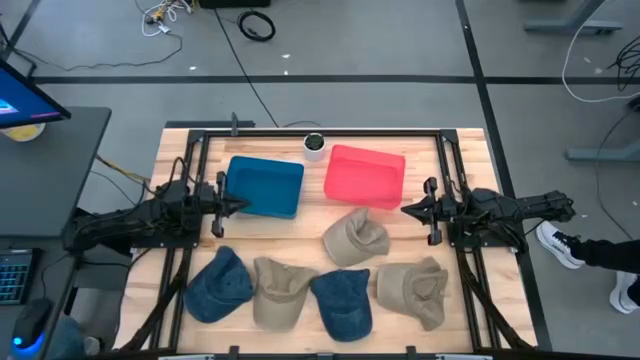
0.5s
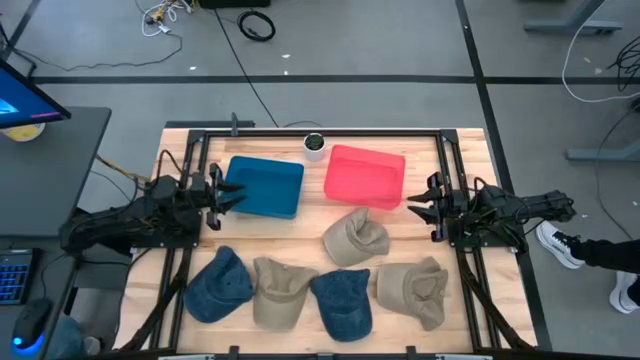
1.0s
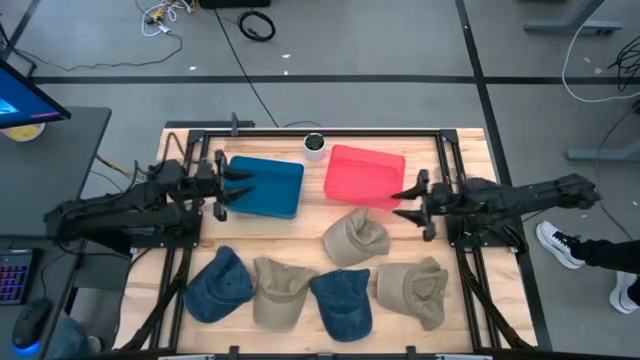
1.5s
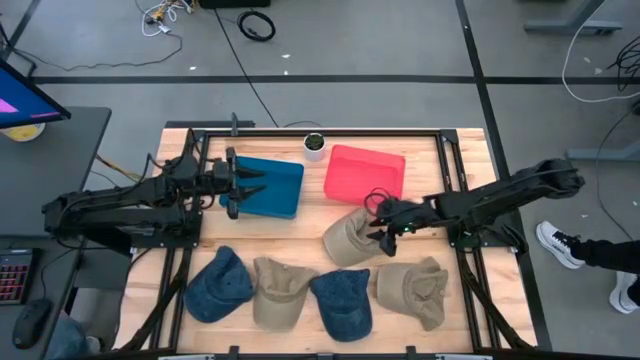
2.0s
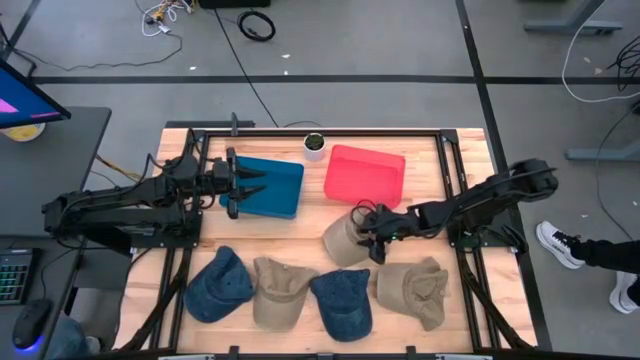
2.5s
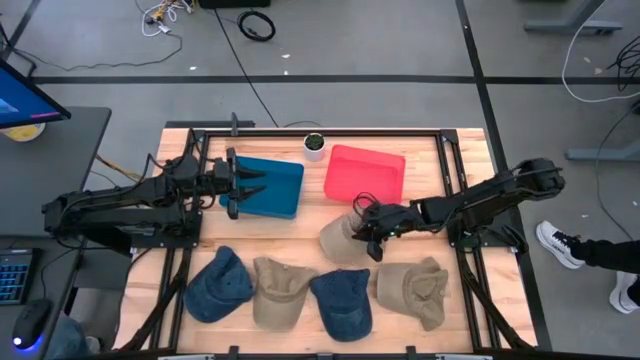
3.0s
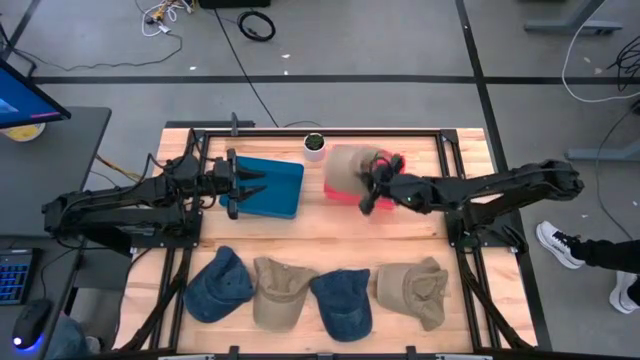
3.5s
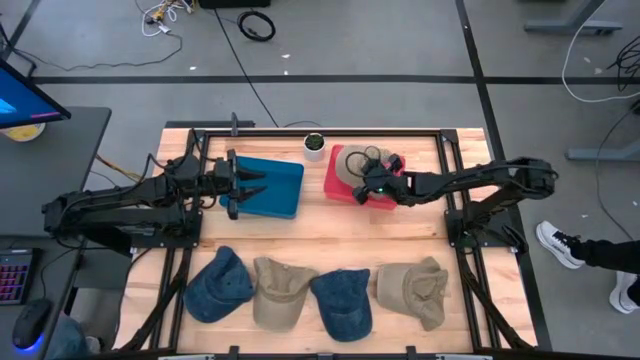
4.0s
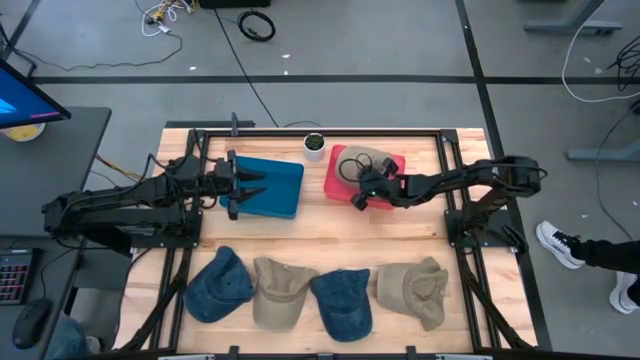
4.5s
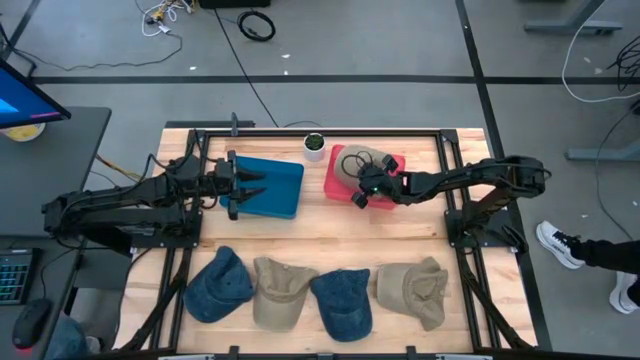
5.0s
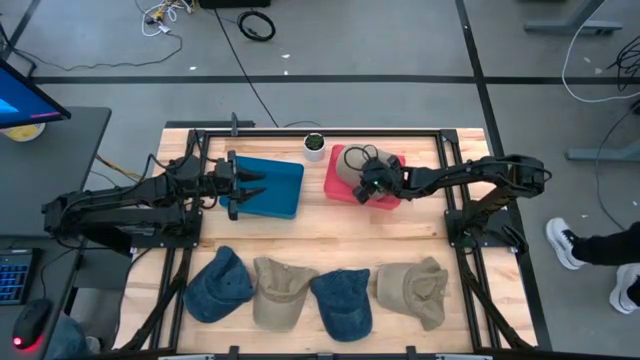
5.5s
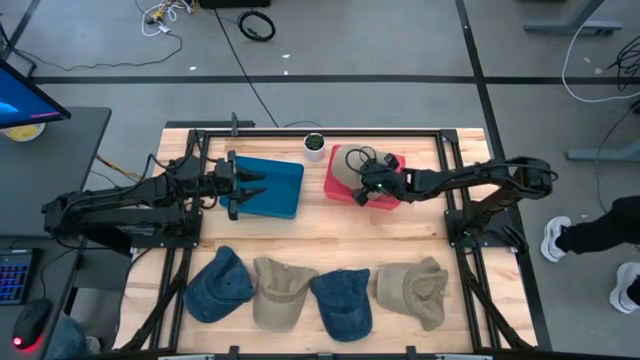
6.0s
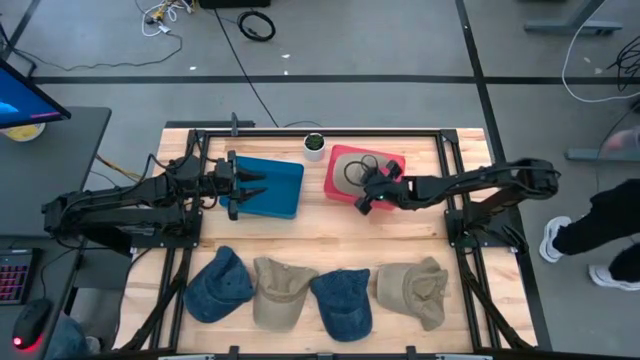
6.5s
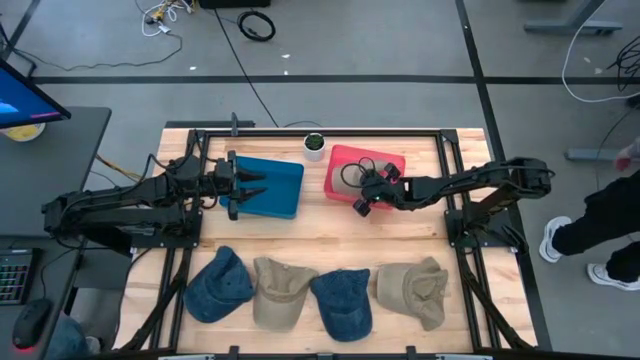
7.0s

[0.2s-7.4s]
Task: Pick & Place hat
Put the top brown cap into the red bin

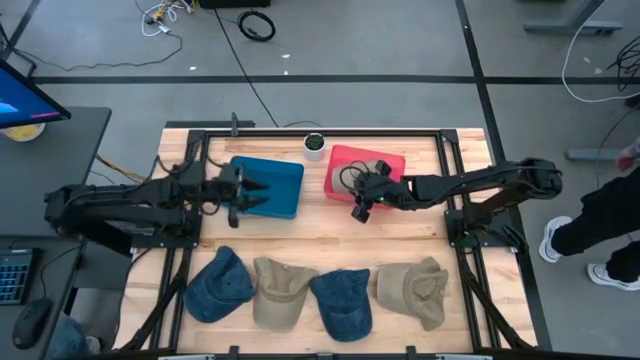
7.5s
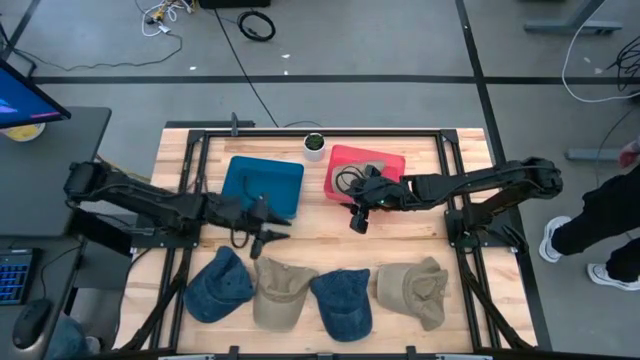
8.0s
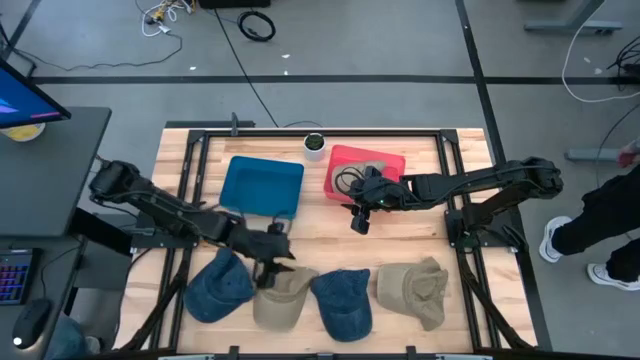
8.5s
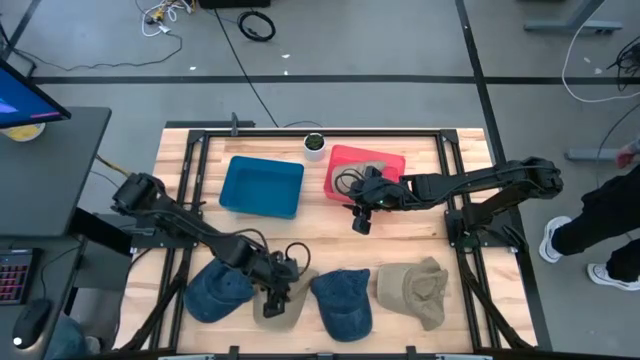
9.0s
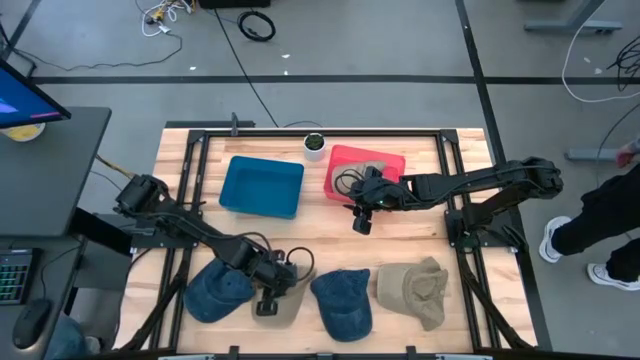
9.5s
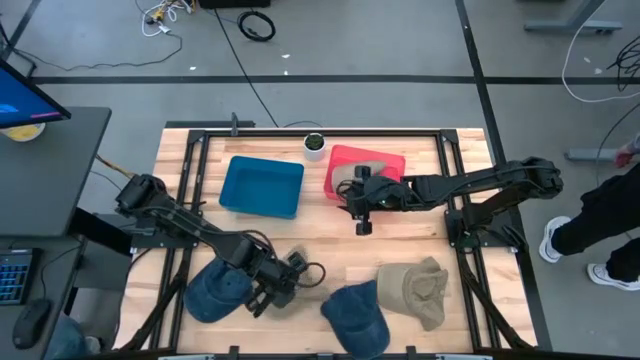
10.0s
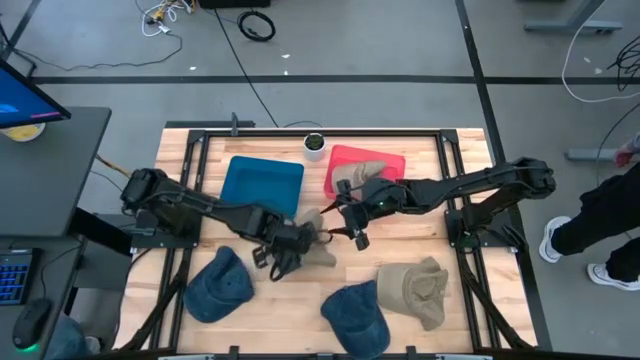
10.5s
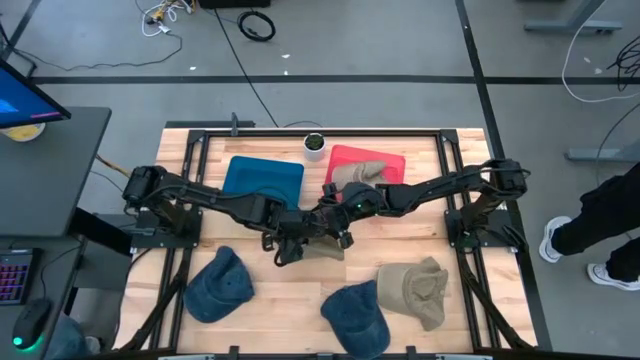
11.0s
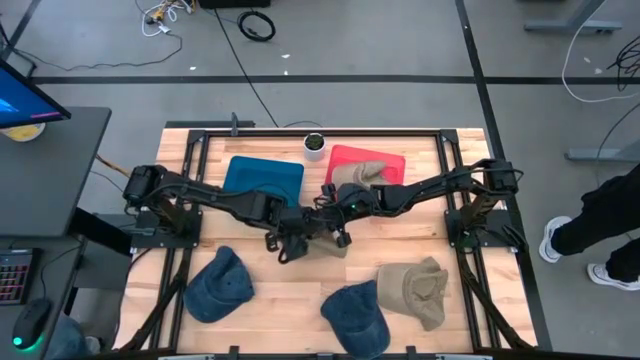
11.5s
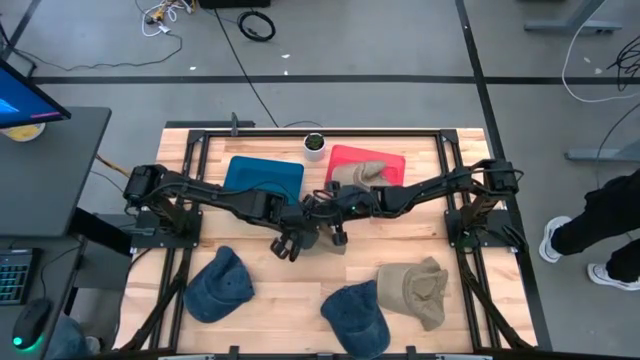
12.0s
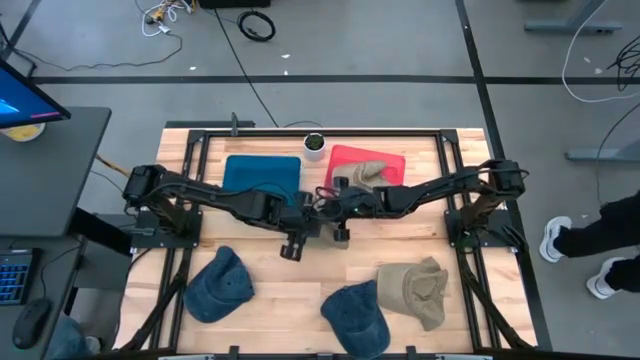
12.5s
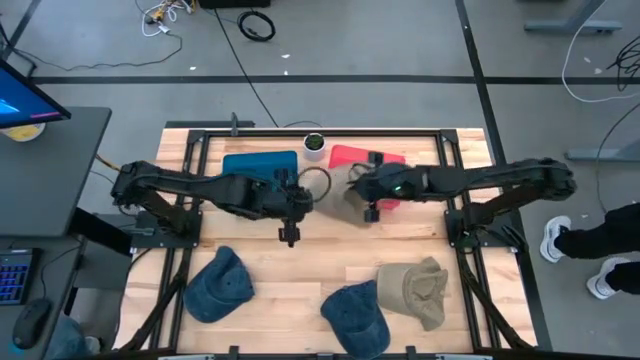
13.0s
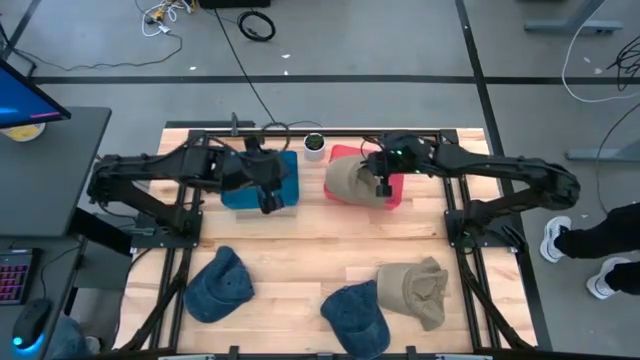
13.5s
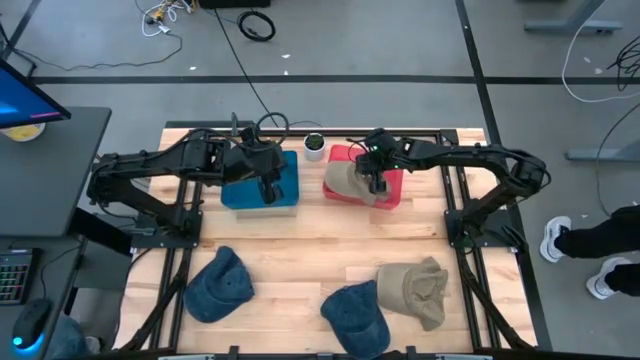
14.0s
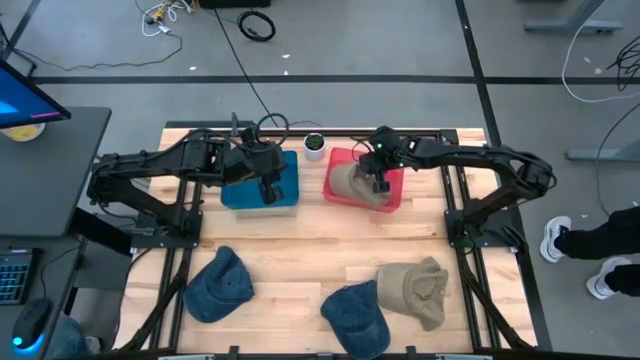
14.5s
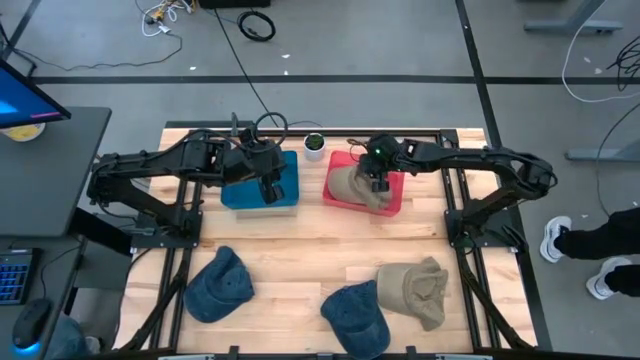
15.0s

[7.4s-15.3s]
Put the left brown cap into the red bin

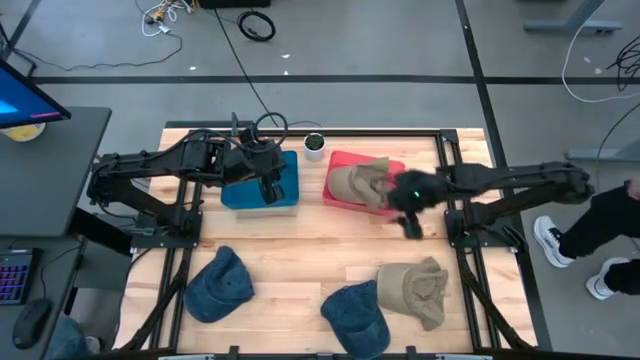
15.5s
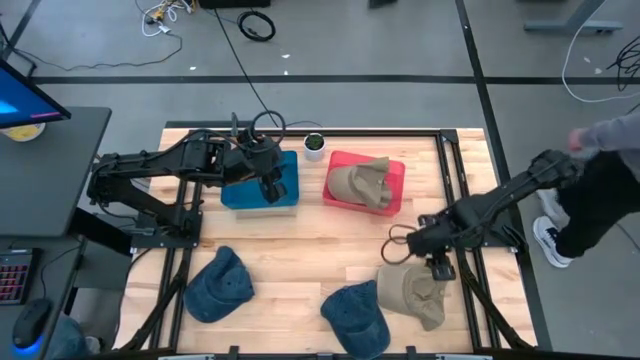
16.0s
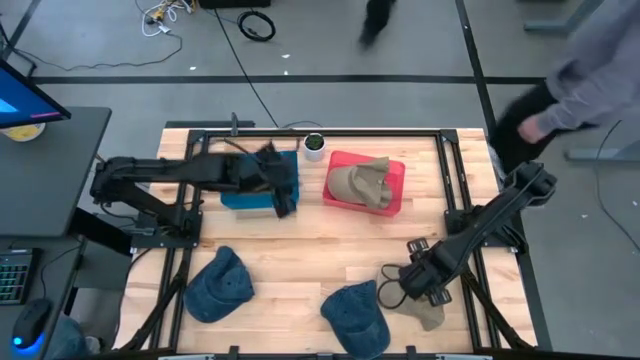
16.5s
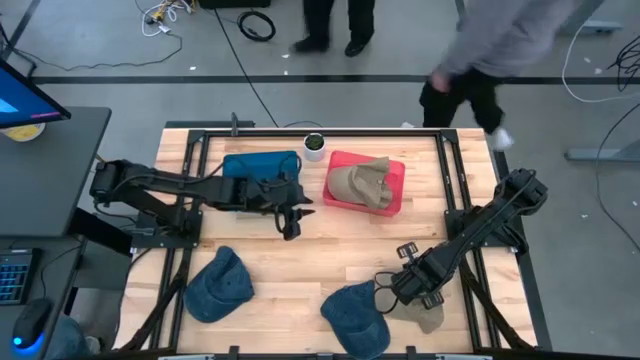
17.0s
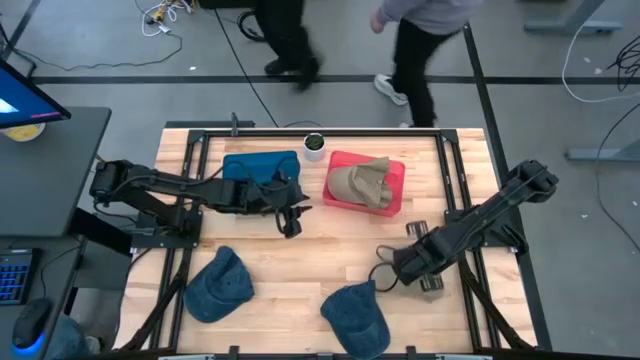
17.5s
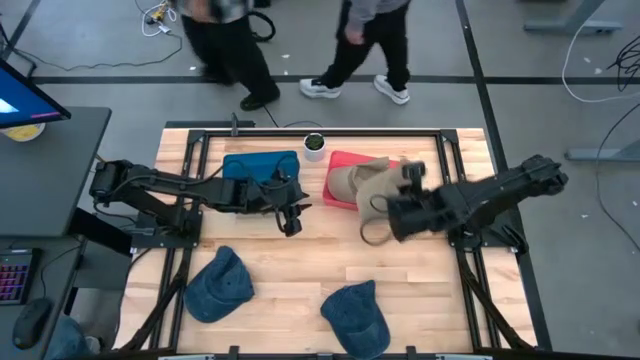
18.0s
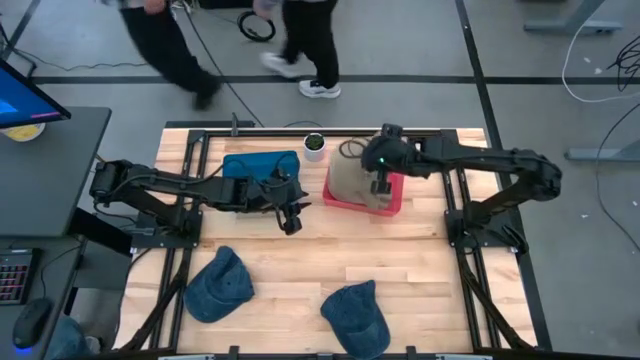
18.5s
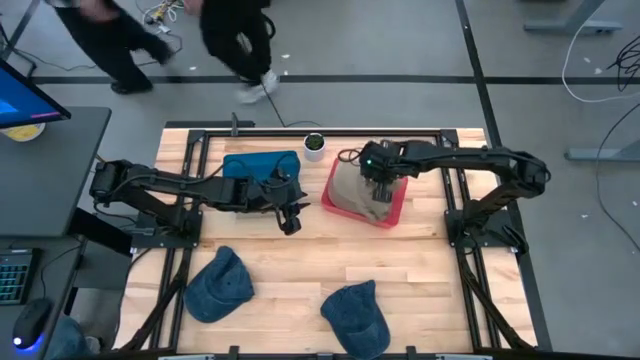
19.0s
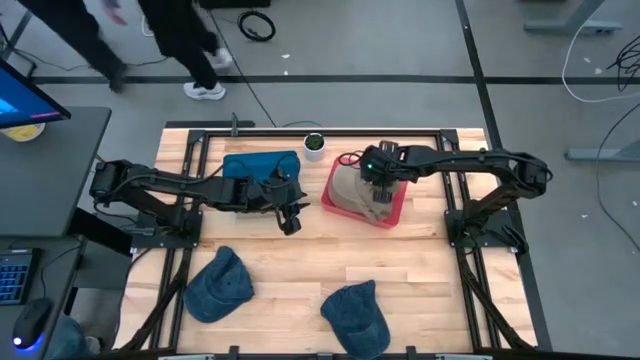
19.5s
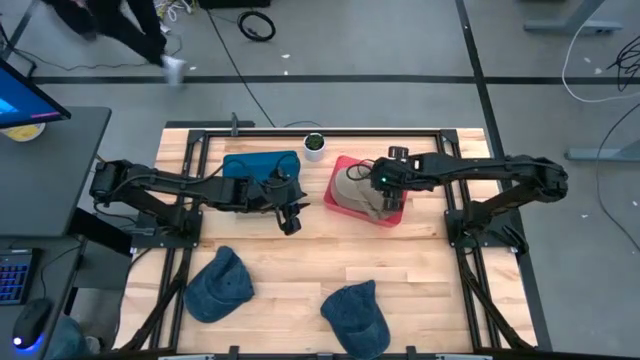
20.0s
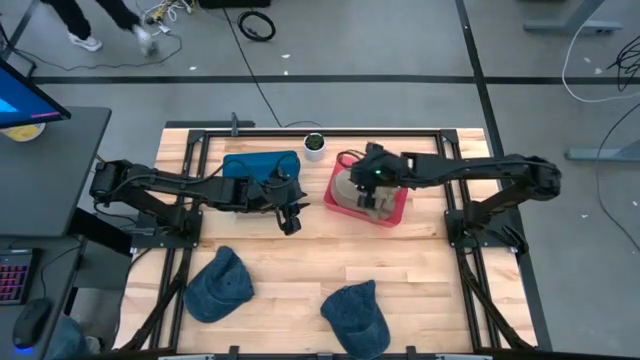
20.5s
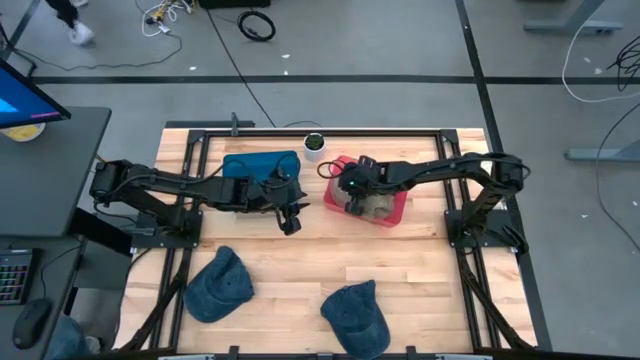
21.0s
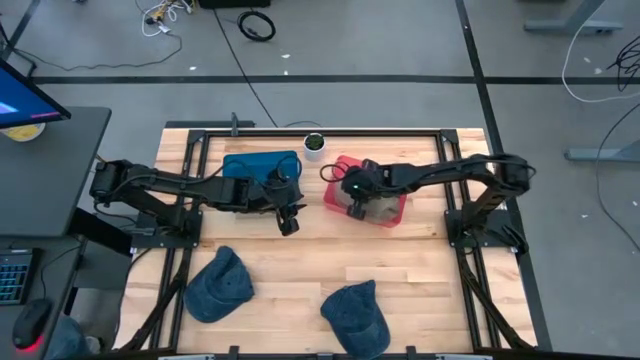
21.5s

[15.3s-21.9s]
Put the brown cap into the red bin
